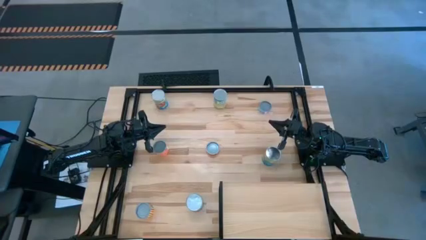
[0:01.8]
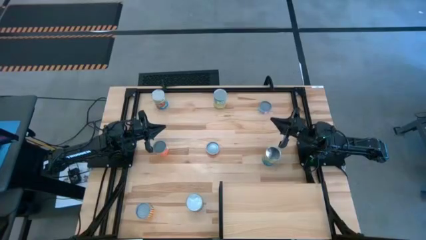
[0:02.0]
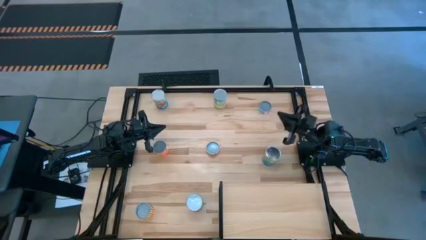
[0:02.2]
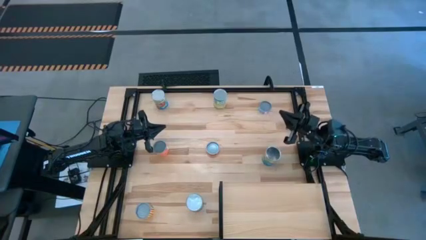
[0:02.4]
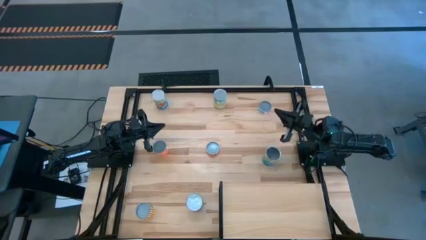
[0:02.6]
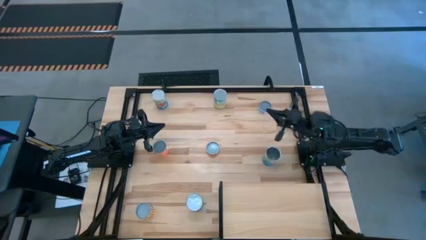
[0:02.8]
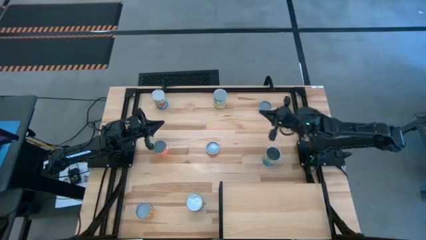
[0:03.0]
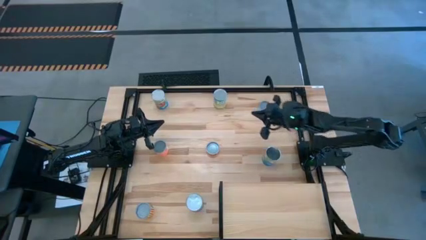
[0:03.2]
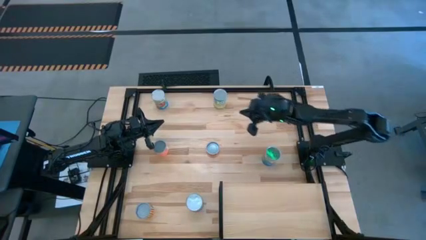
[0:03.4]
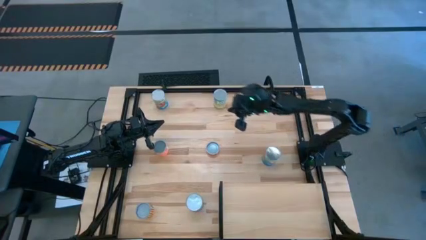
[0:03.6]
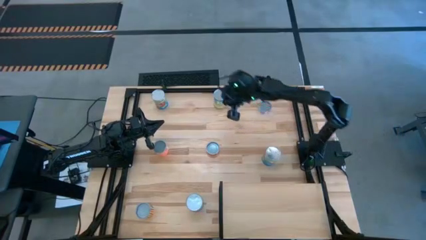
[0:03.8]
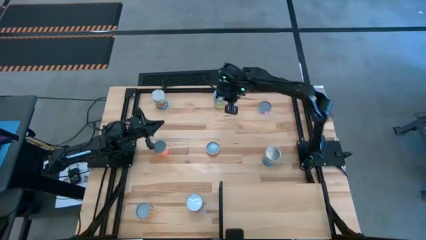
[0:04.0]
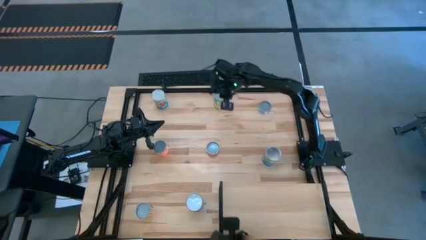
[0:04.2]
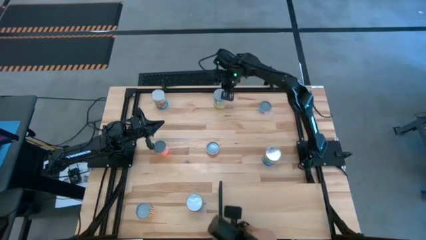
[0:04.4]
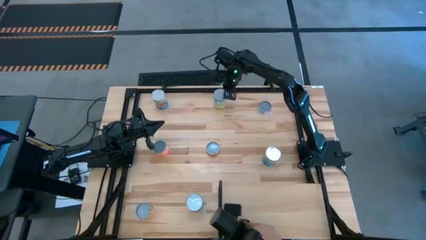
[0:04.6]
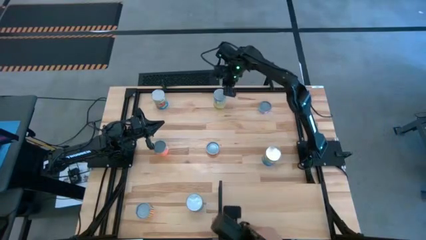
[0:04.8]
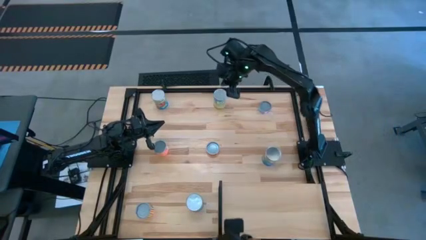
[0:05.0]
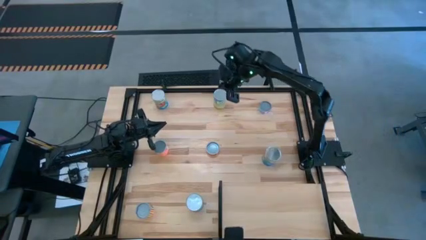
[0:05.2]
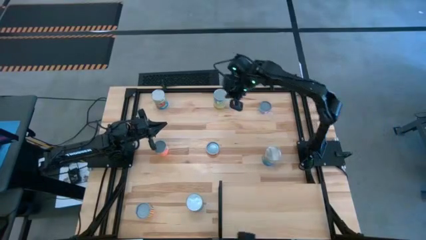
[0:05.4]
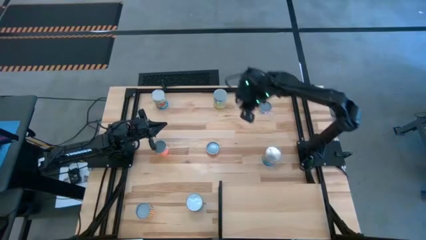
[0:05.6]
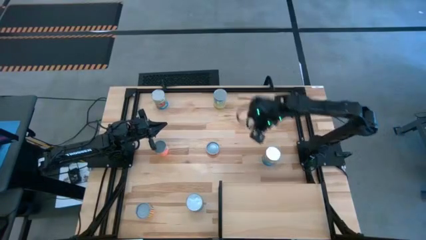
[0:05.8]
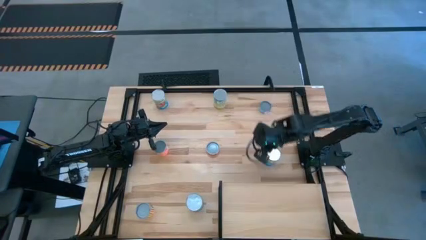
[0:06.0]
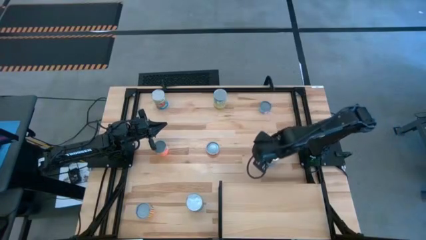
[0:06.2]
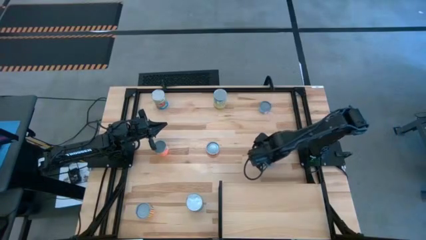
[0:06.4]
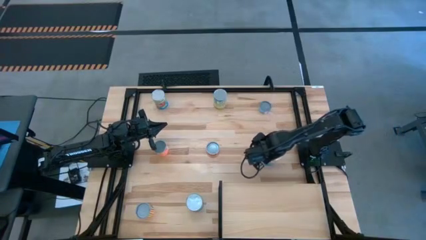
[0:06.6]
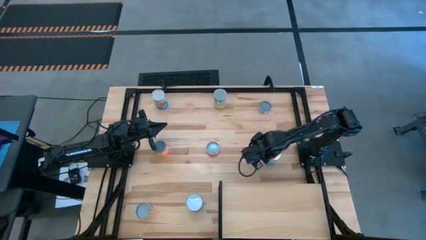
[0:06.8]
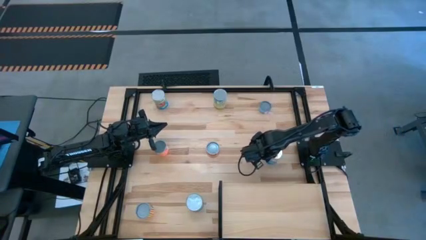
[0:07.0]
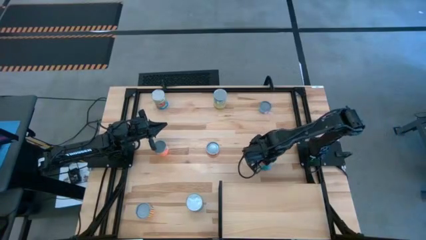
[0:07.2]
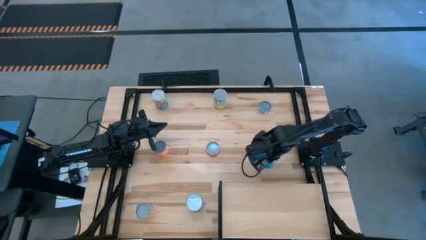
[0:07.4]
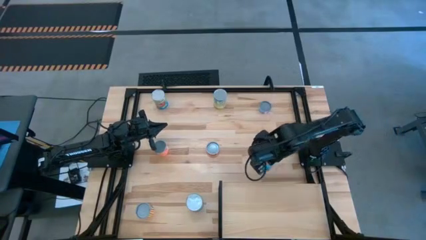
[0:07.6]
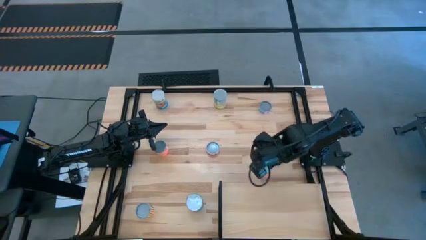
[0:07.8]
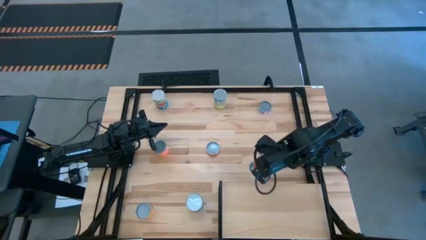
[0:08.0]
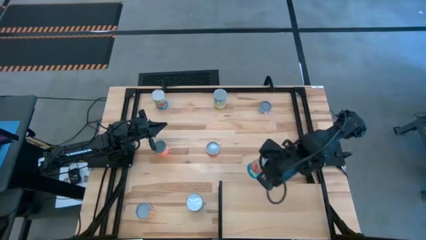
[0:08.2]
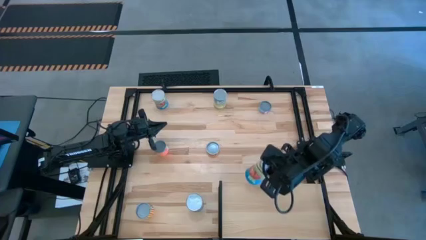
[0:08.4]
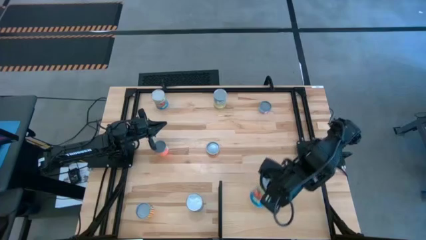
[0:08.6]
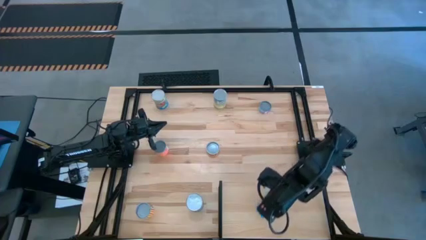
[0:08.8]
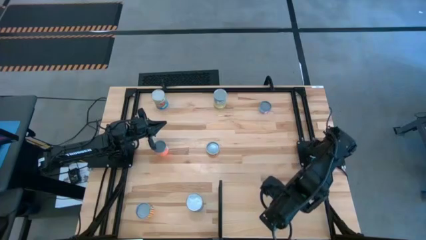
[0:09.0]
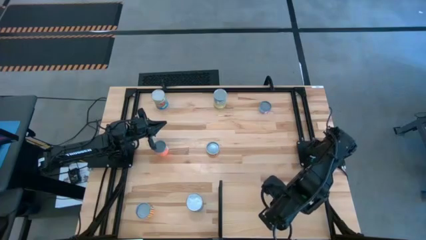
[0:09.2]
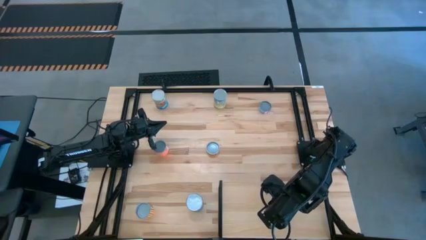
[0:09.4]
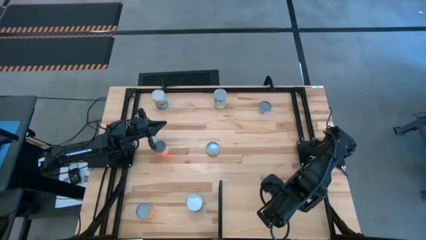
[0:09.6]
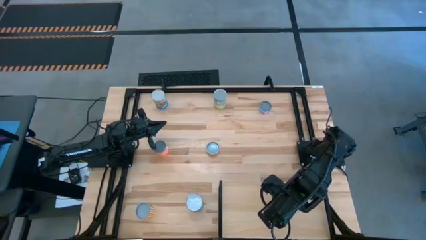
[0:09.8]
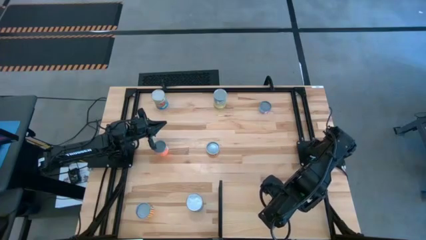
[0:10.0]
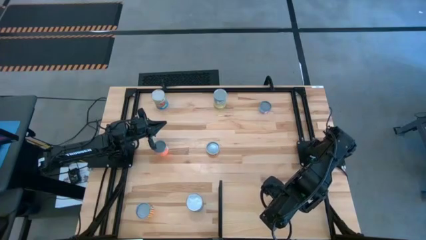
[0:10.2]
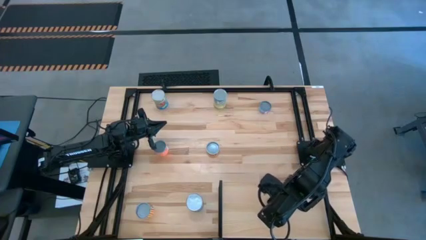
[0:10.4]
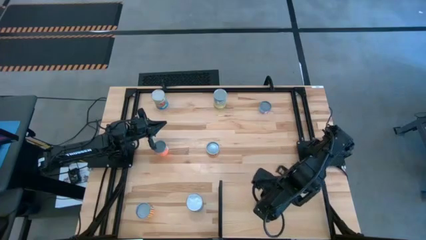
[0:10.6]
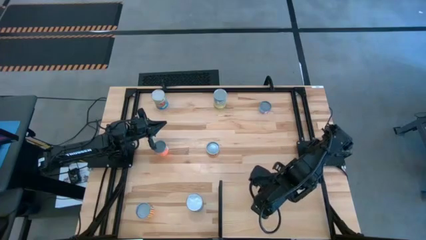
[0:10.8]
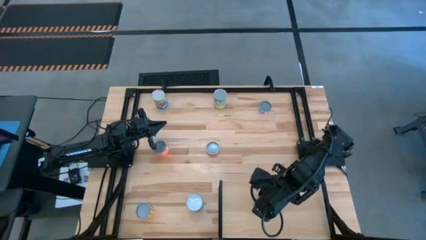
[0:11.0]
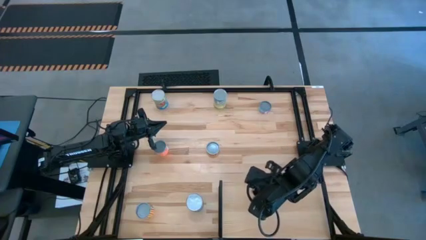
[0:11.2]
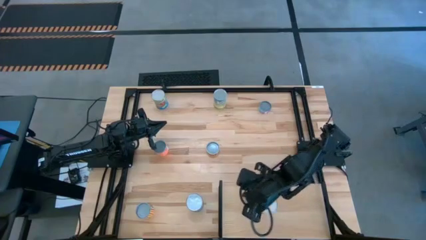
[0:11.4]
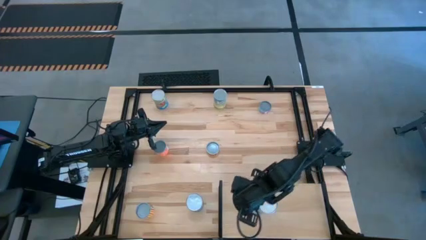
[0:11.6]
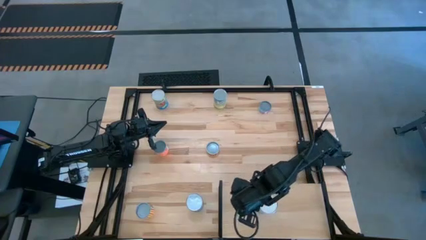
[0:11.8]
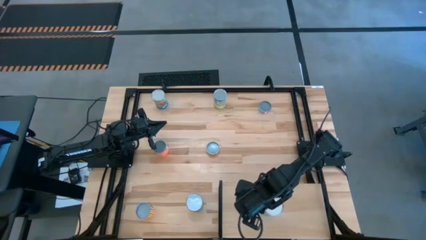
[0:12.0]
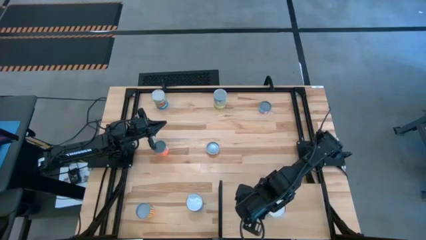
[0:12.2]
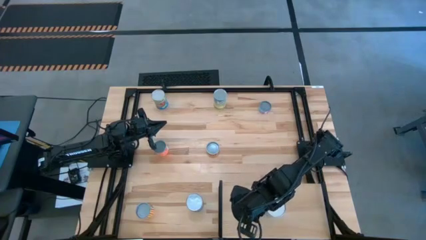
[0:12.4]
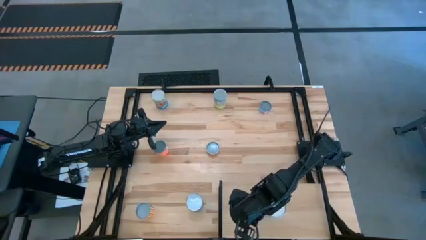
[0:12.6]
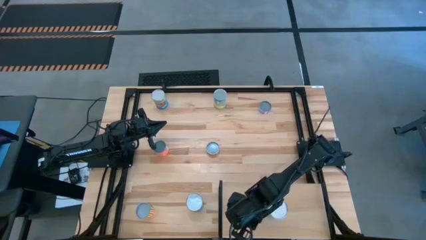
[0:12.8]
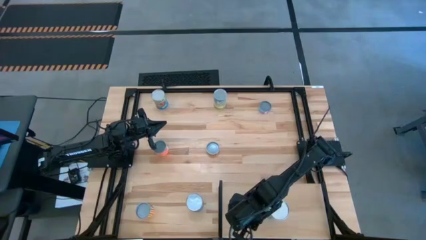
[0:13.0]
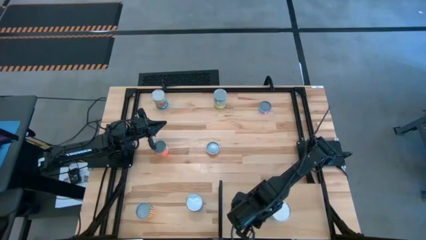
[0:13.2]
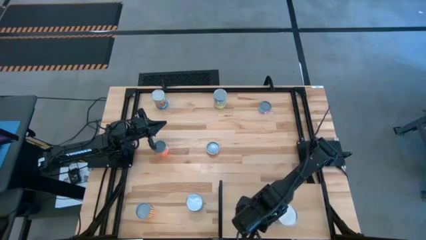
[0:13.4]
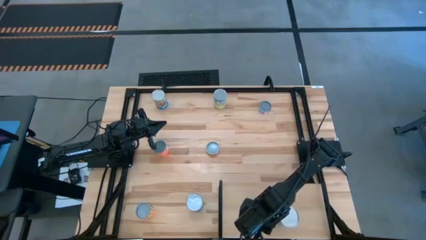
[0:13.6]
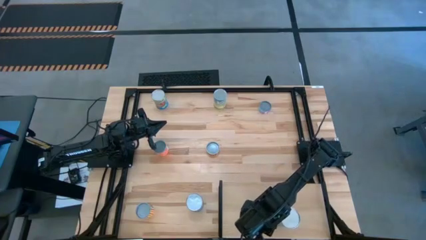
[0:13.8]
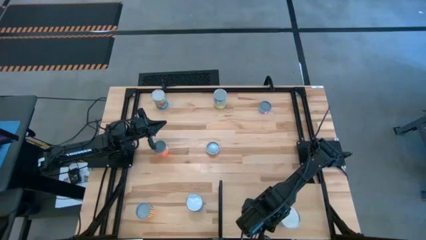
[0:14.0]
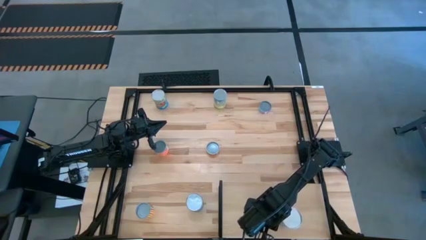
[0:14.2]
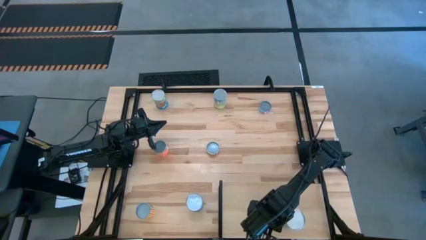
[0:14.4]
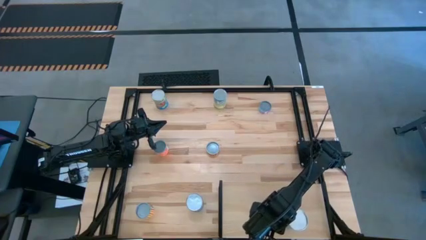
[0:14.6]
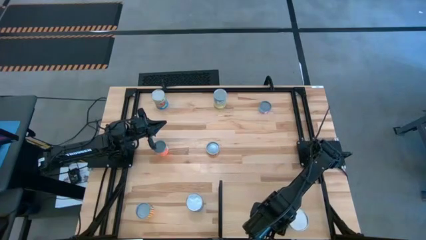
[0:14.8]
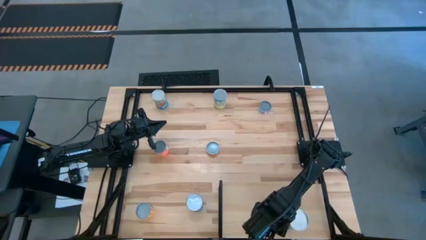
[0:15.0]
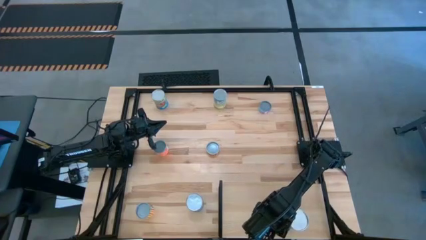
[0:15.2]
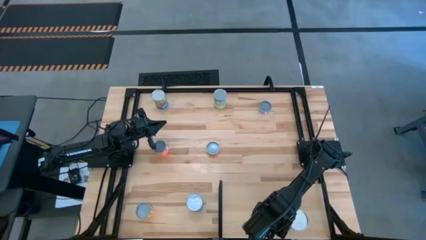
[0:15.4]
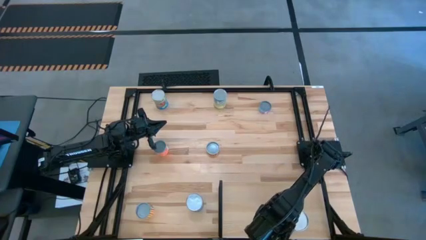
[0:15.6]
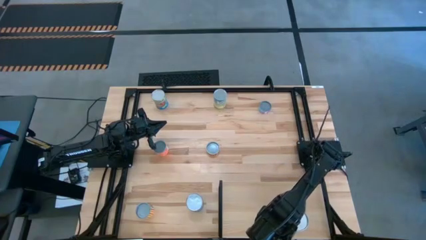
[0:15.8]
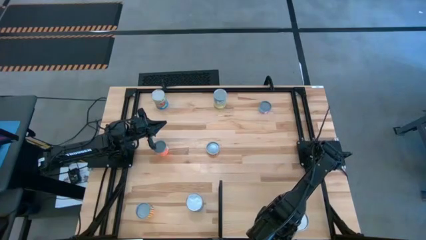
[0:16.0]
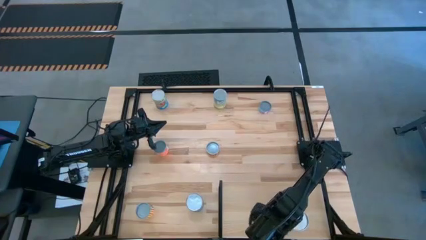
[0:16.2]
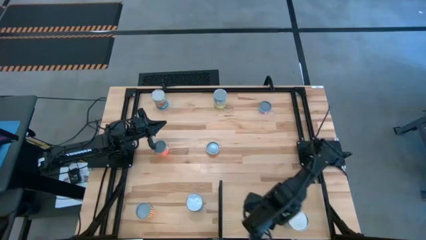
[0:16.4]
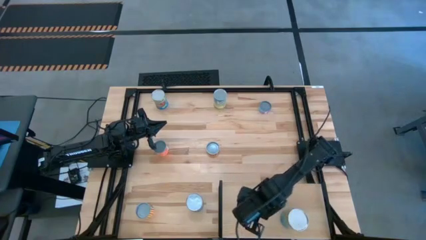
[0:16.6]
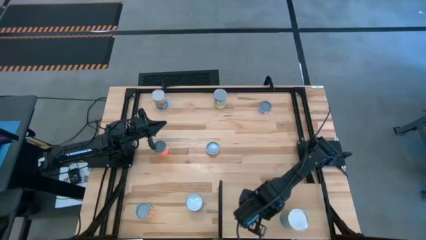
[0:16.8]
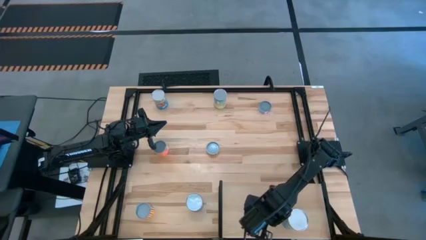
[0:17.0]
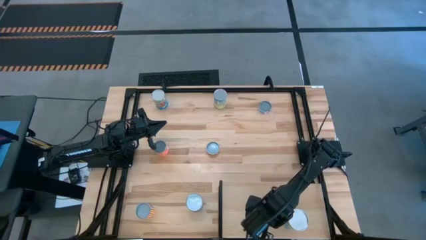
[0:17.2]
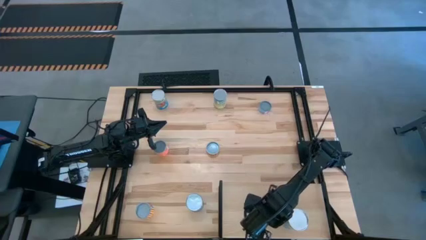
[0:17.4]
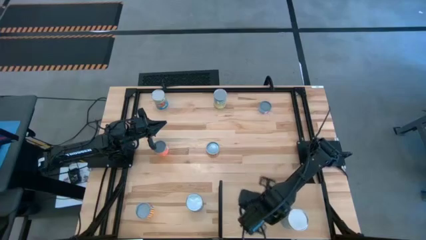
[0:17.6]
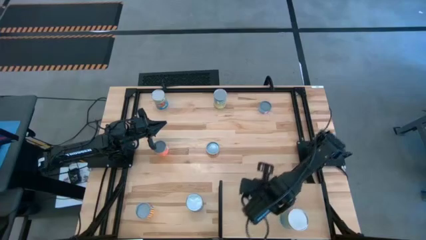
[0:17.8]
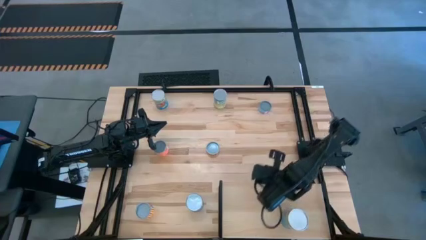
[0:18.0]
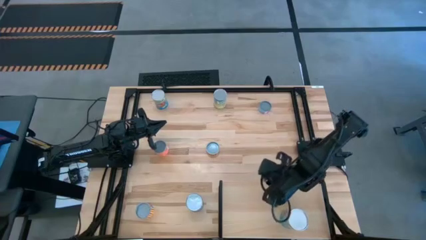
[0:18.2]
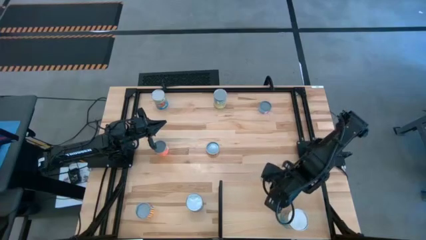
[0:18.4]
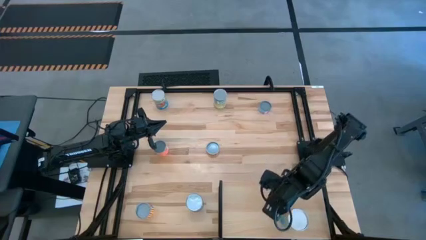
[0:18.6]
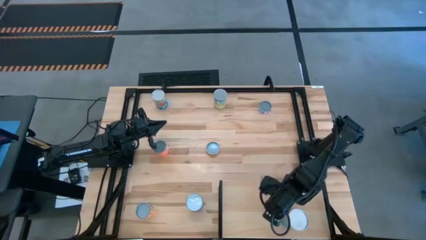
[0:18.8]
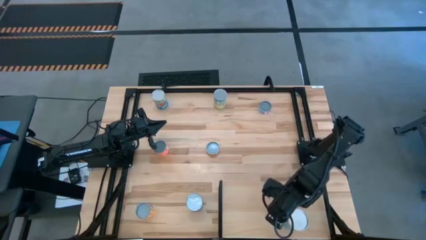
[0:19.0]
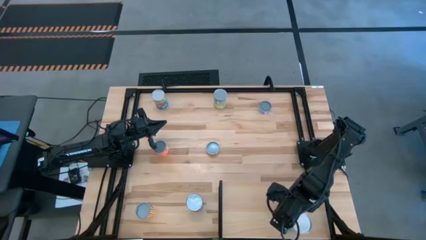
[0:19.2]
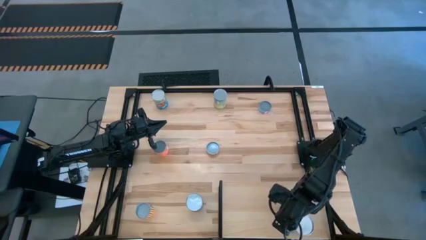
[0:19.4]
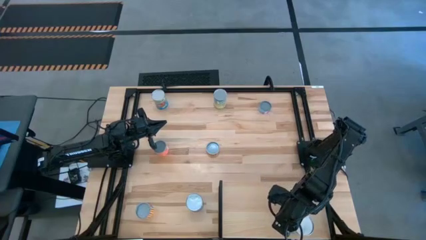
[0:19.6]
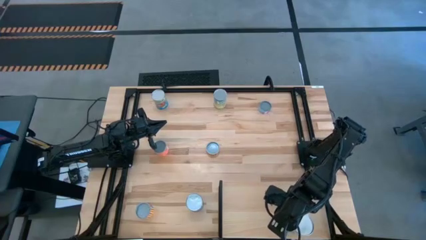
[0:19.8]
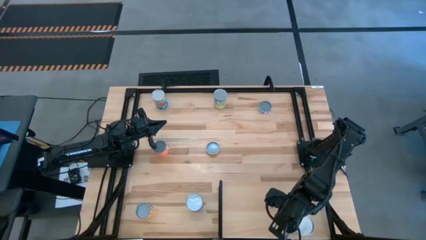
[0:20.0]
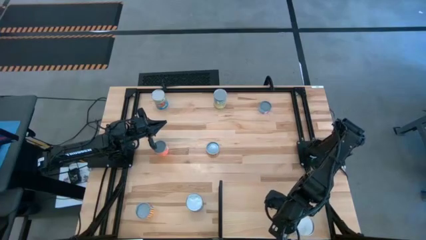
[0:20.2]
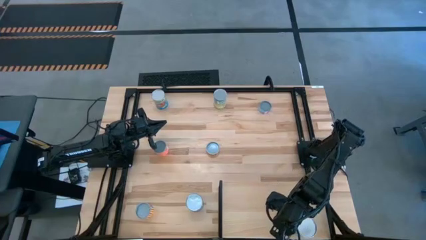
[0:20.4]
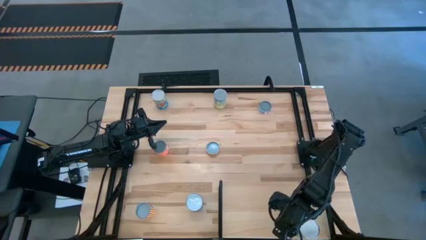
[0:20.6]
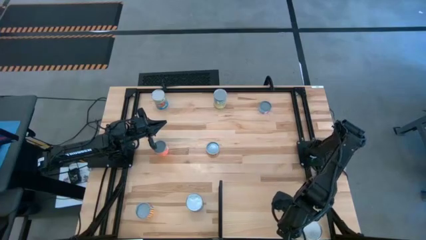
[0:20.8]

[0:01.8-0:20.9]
Task: Pick and place cans onto a shelf
Put the canned tomatoes on the shelf
